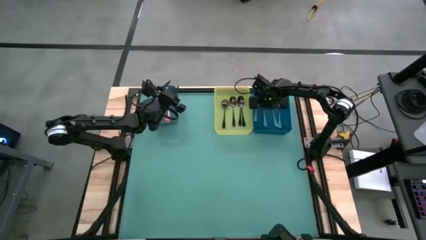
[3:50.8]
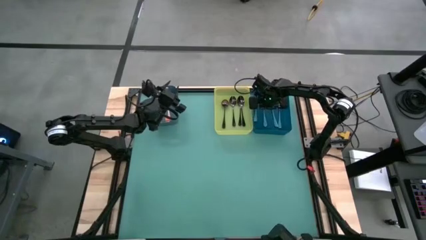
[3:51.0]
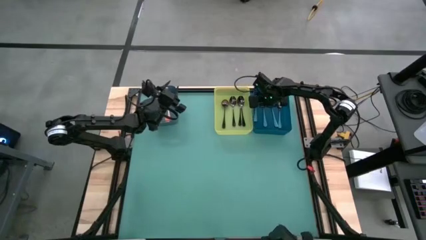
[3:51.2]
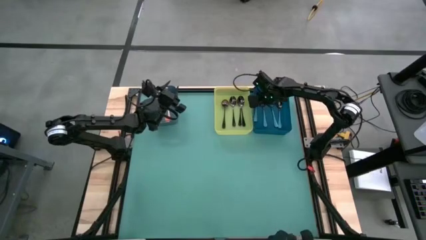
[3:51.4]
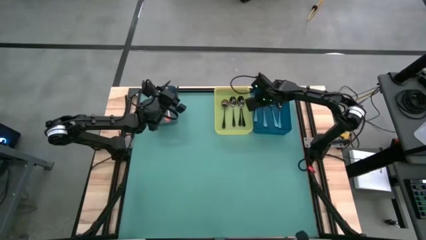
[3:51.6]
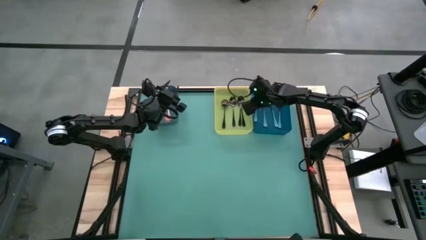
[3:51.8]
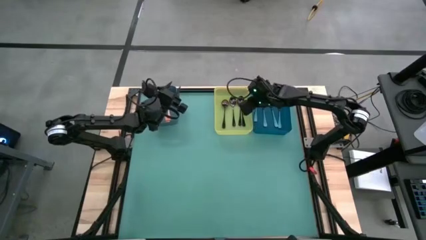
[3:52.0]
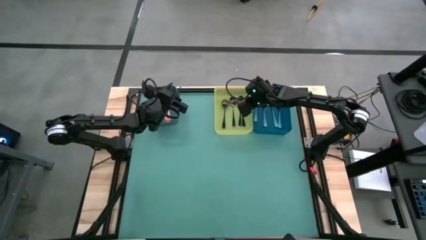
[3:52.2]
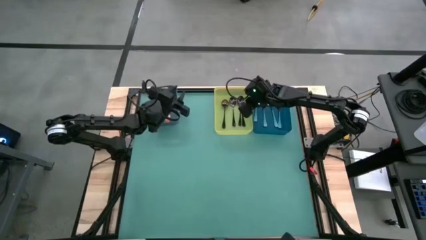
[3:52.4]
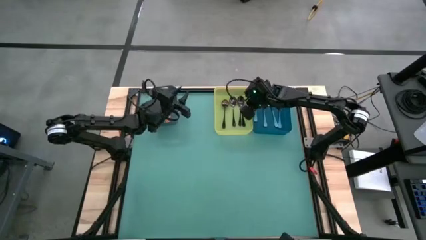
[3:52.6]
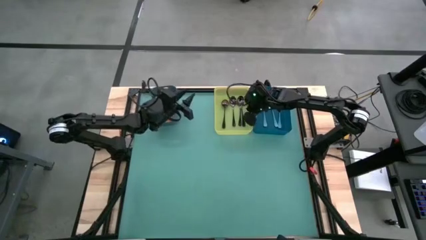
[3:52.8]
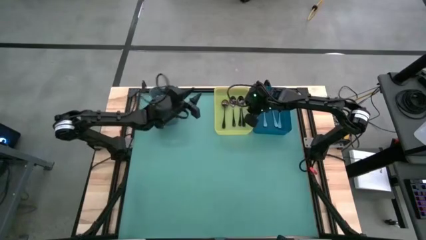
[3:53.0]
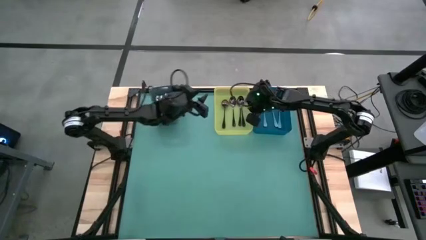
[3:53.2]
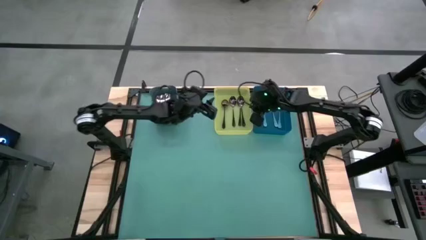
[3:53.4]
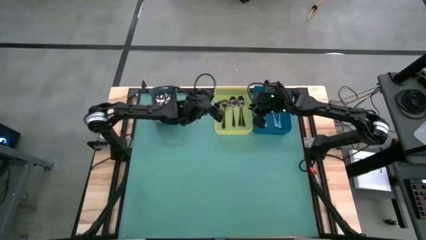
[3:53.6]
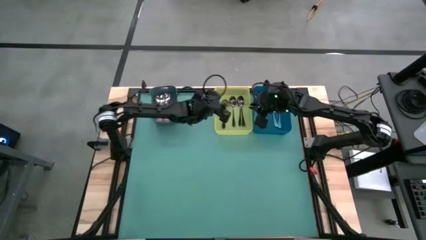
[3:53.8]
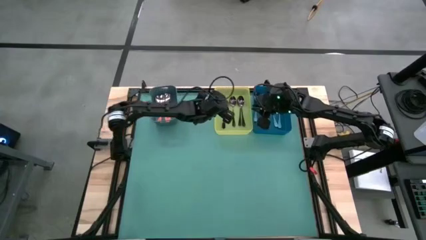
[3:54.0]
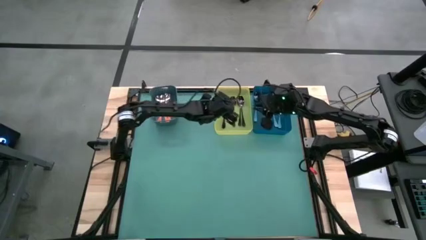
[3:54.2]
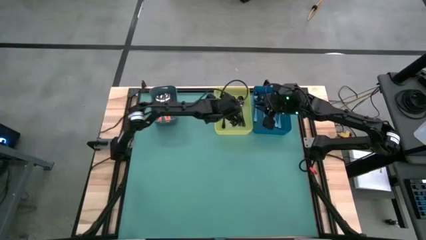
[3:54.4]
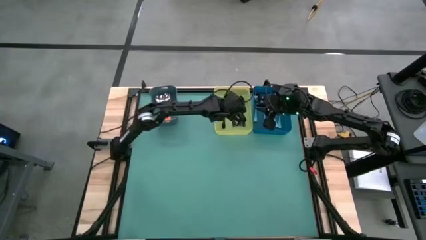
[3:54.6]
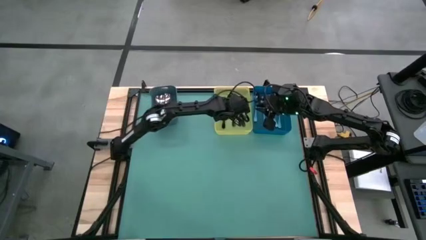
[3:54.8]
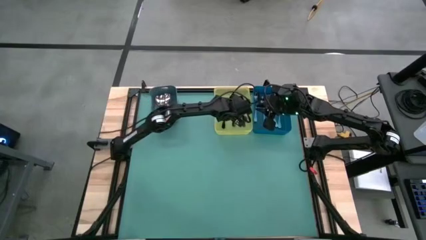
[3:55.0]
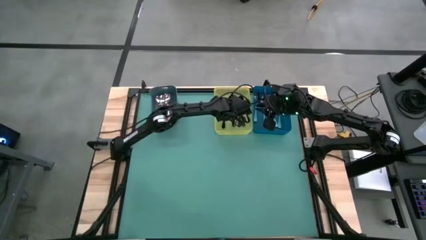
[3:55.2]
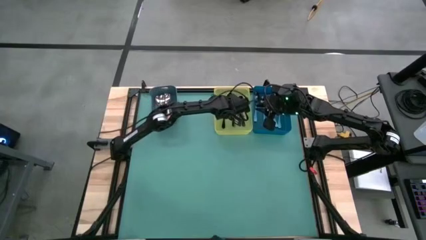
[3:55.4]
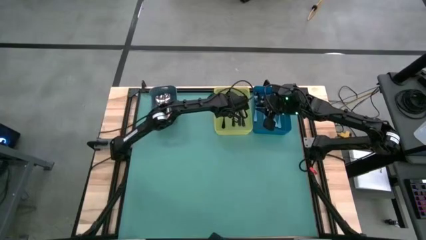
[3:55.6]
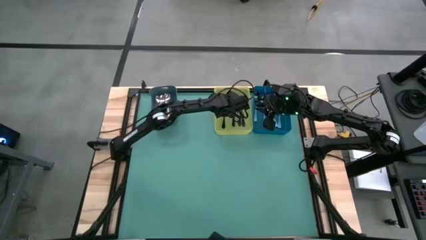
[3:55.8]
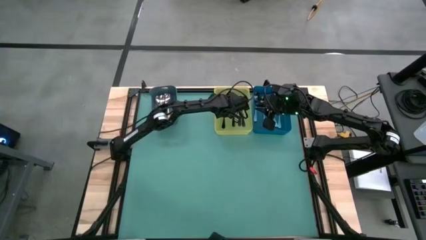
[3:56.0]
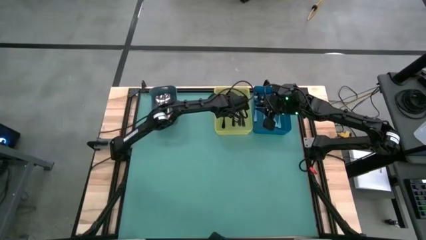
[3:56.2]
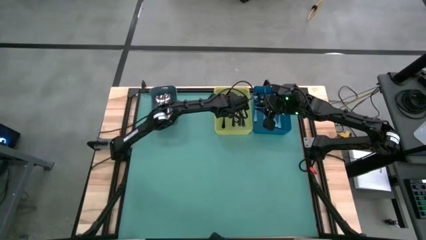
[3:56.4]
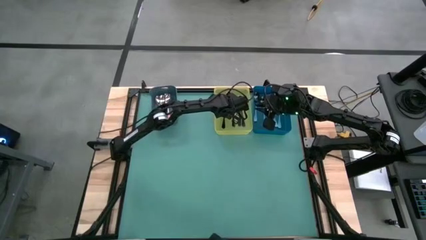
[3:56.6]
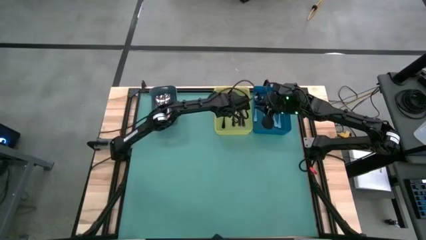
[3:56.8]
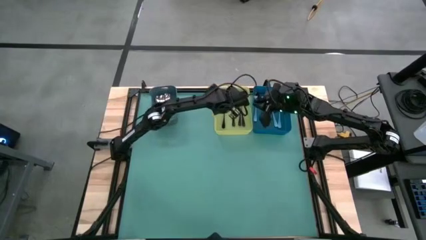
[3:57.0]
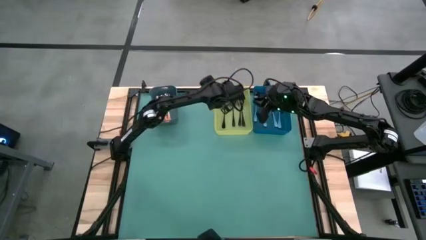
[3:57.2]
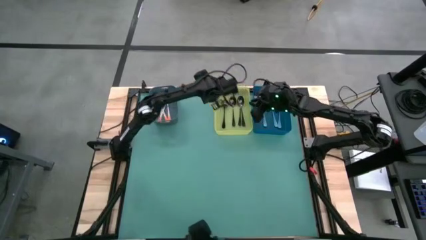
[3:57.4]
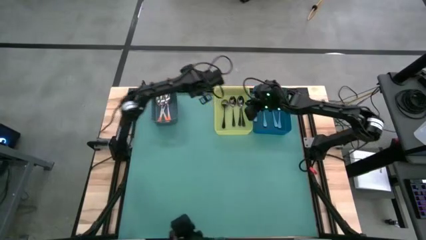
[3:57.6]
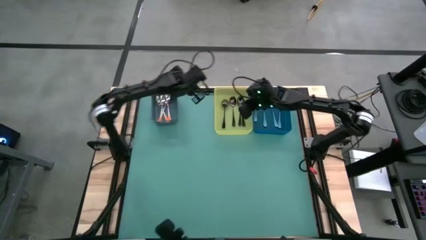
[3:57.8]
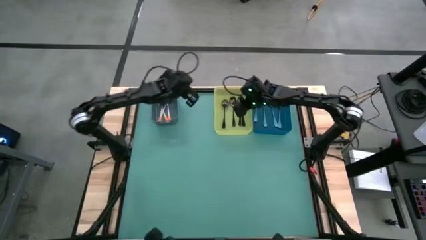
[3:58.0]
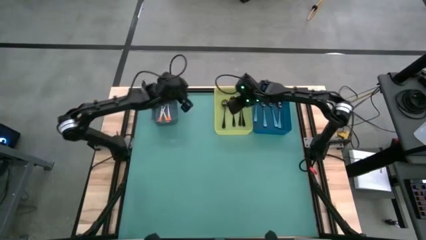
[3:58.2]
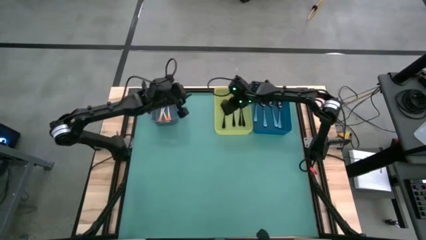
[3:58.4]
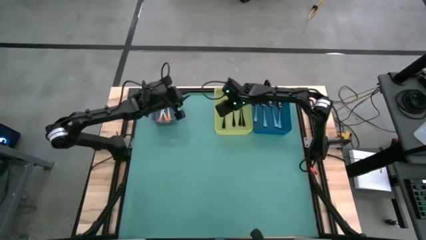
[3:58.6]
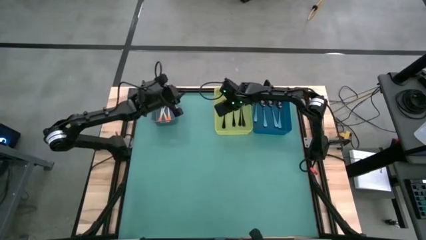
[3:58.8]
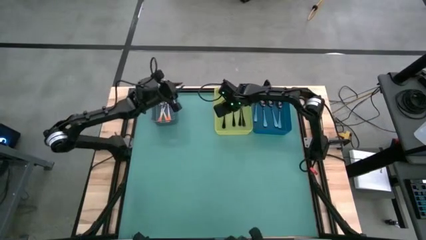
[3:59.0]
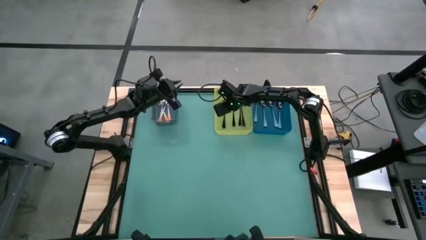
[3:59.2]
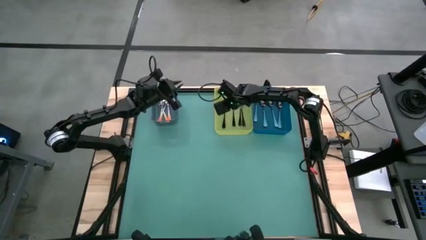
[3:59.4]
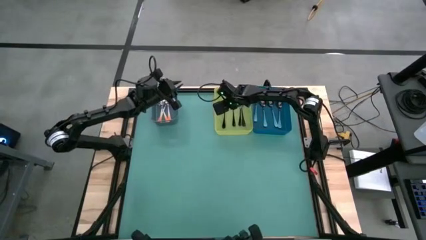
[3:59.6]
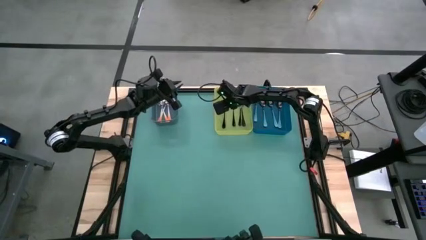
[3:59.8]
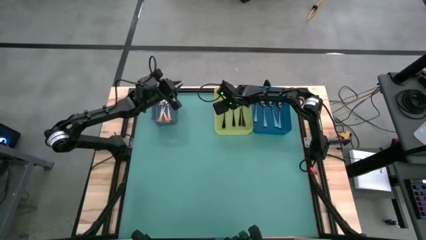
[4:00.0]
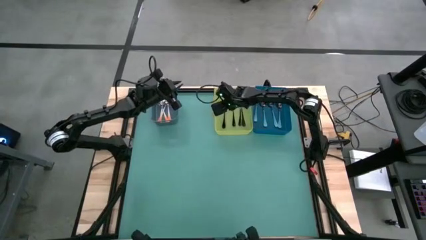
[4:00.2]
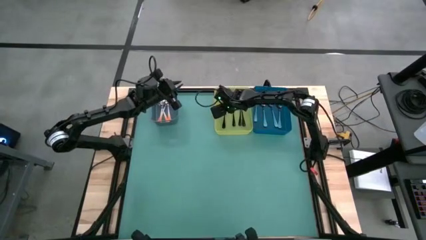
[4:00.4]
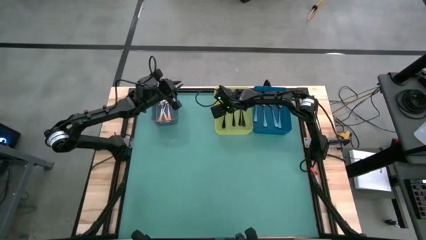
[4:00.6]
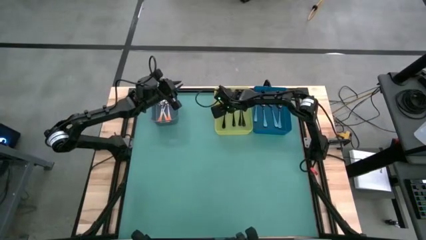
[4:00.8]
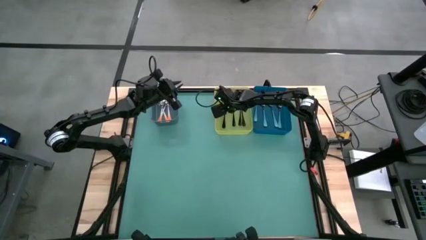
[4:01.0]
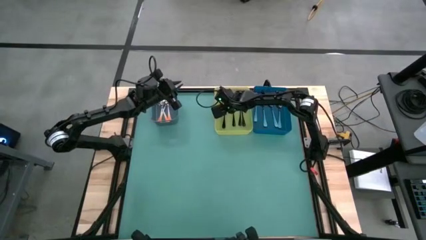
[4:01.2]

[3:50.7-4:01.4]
Task: Sort silverware by color (type)
Adjust the black spoon on the yellow bin

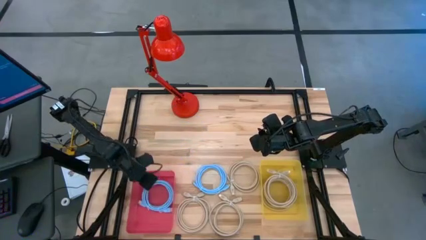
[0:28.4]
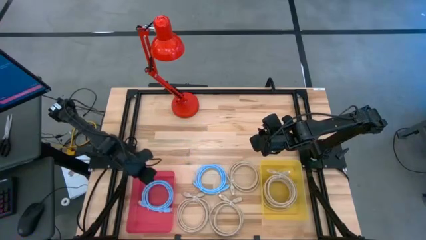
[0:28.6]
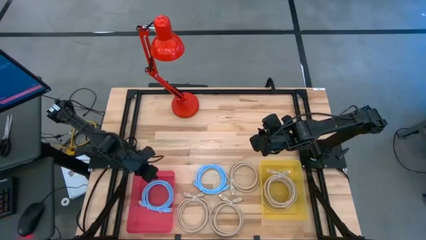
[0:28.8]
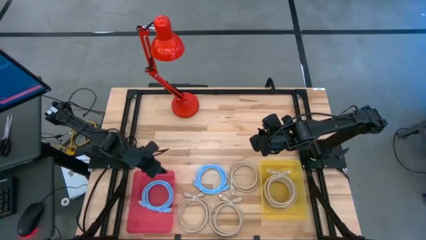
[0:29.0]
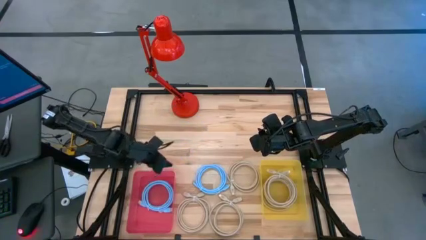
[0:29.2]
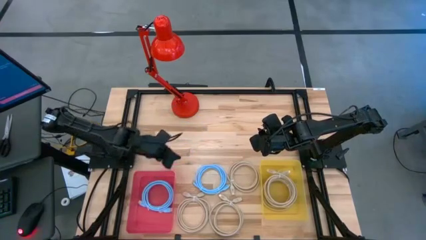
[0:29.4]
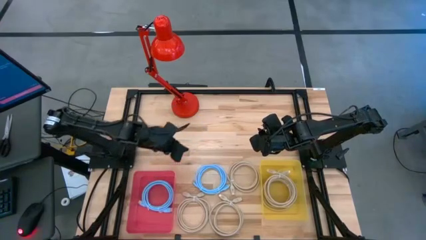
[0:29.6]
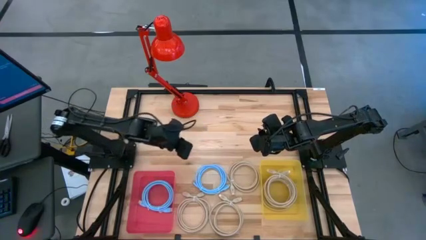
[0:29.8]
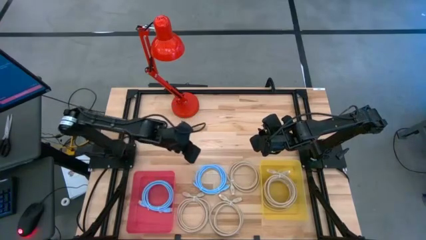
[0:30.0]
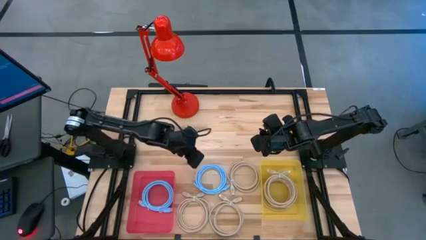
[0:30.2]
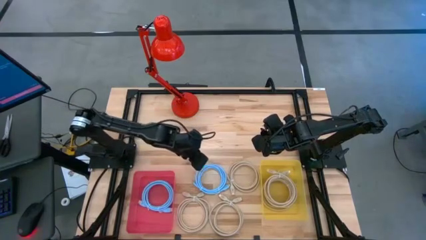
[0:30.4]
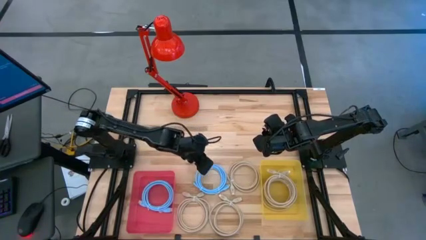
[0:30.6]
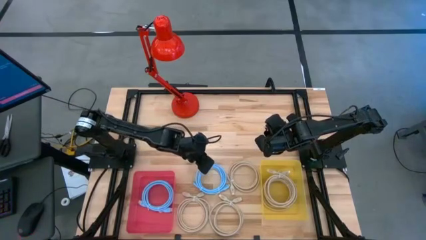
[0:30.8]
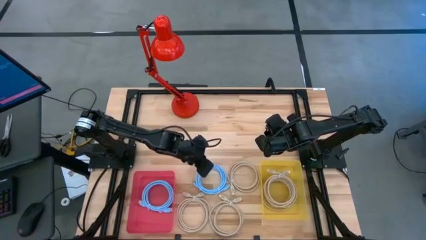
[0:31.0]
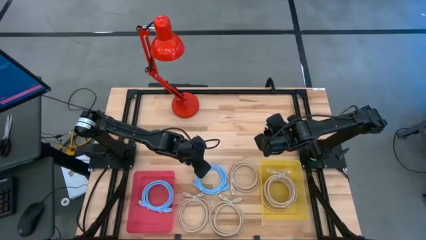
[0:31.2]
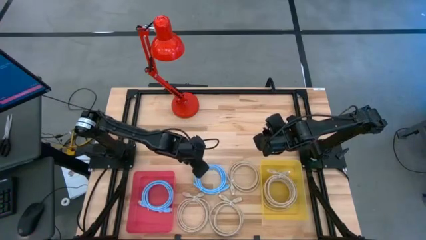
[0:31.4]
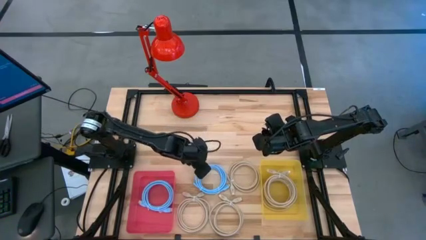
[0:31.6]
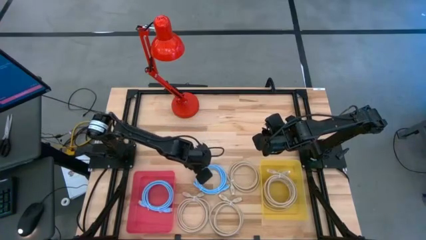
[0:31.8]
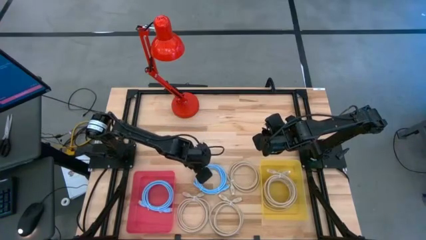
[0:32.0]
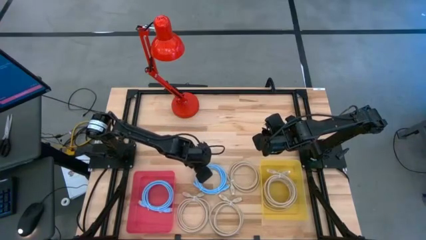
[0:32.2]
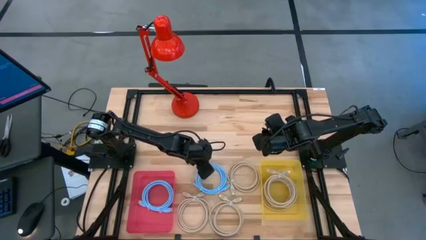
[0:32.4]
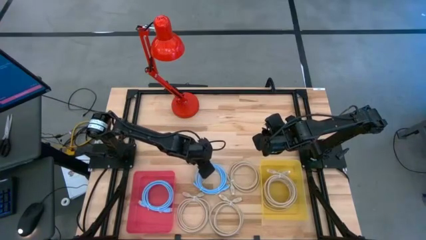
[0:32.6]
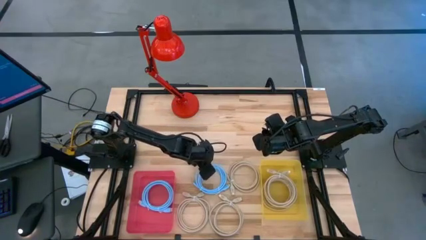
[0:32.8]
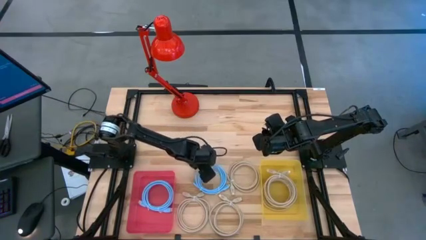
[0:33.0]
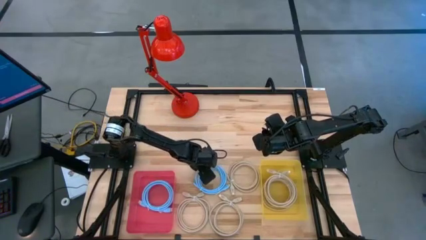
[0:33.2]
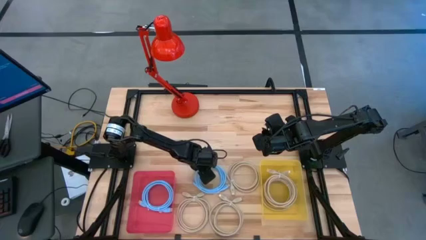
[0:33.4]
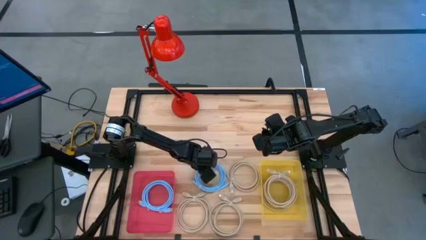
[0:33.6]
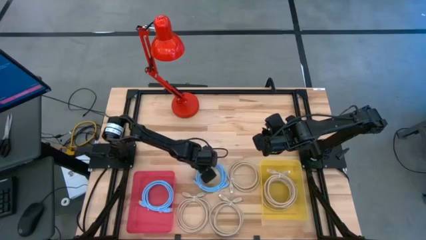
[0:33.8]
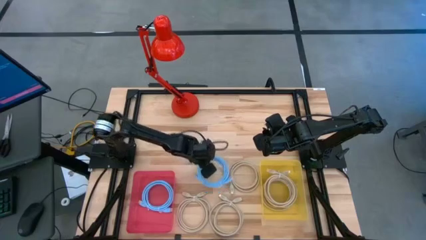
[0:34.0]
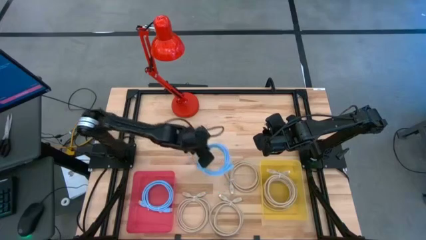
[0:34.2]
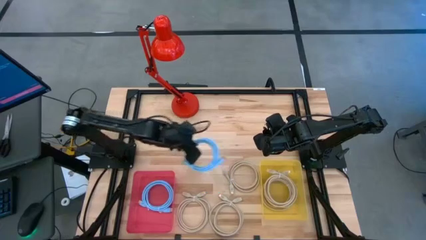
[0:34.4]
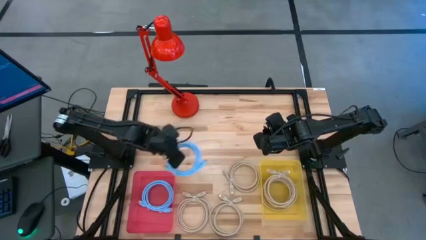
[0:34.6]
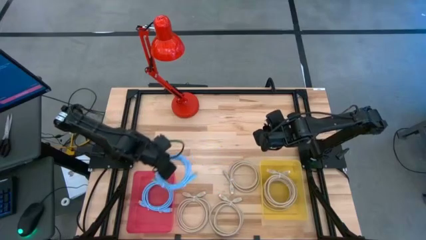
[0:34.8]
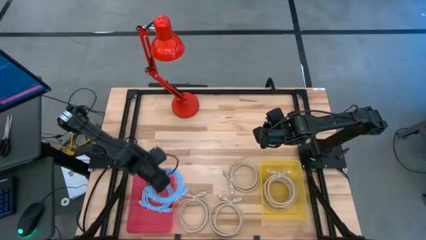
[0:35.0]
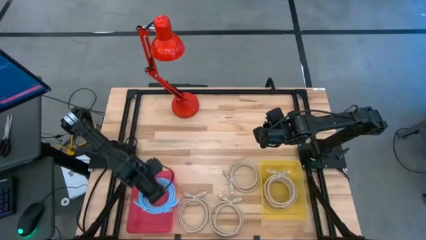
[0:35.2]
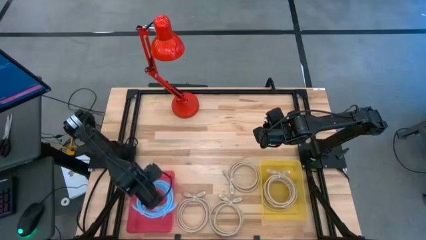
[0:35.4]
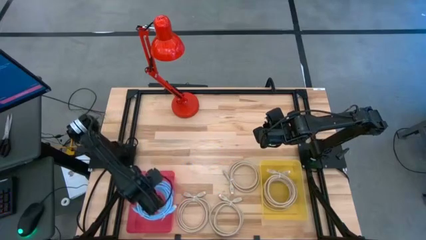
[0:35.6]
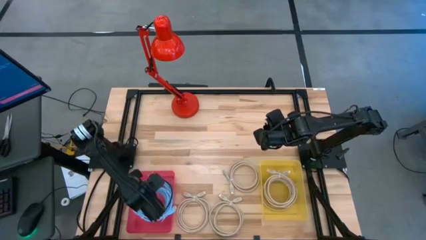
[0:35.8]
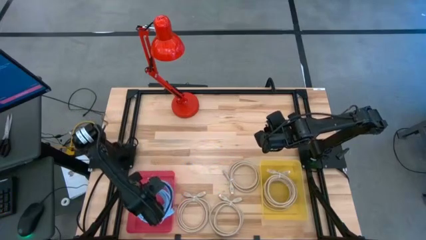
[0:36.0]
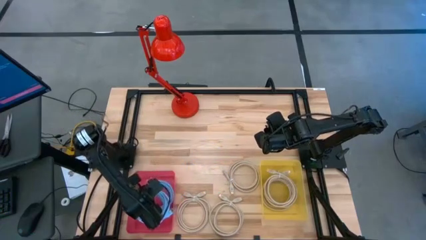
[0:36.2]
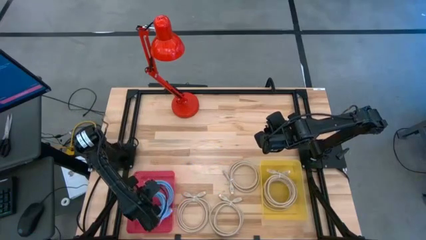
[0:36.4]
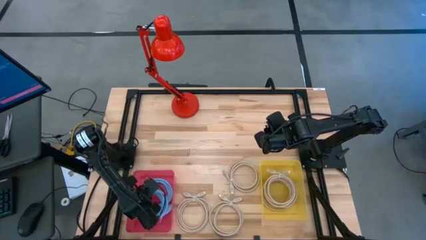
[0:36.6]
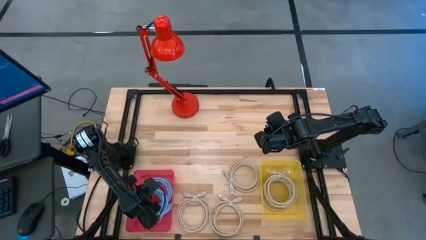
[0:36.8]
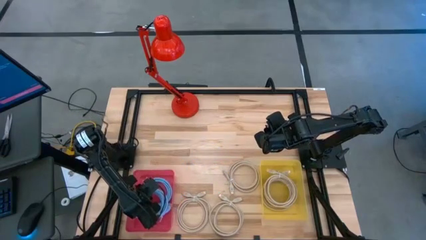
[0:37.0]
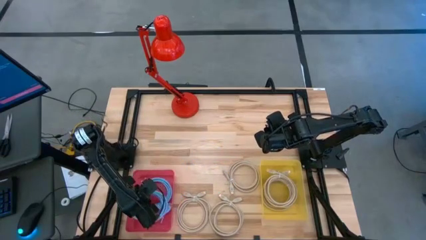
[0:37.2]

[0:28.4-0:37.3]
Task: Pick & Place USB Port
Put the blue charger cable into the red bin
